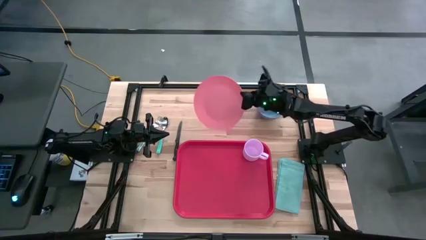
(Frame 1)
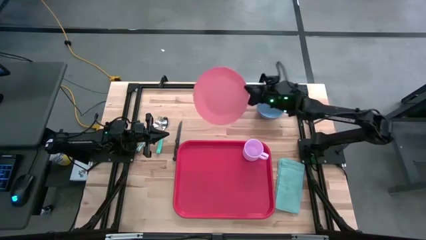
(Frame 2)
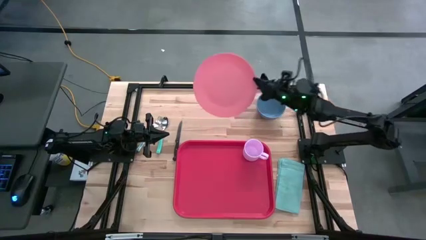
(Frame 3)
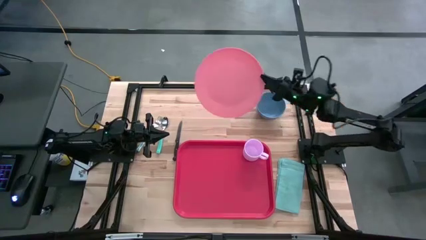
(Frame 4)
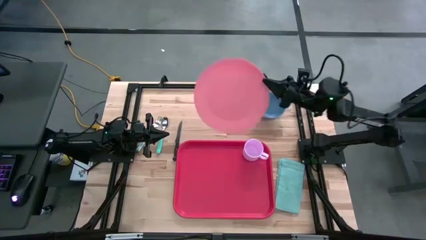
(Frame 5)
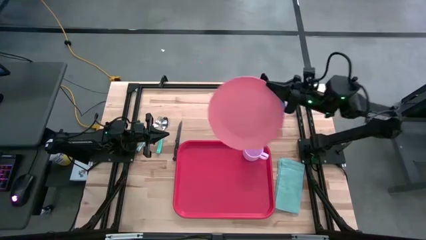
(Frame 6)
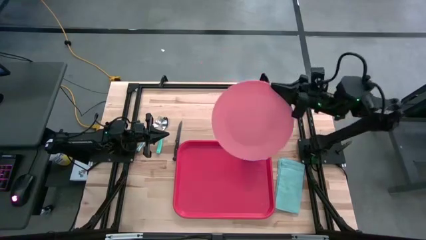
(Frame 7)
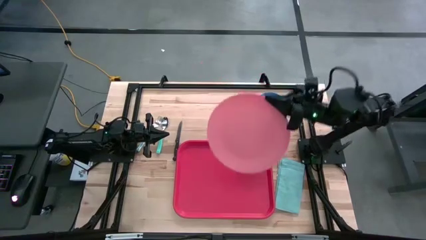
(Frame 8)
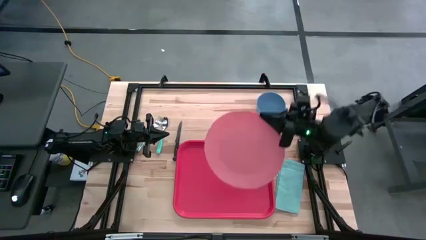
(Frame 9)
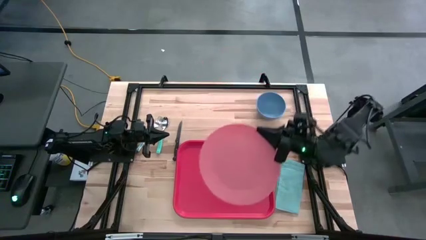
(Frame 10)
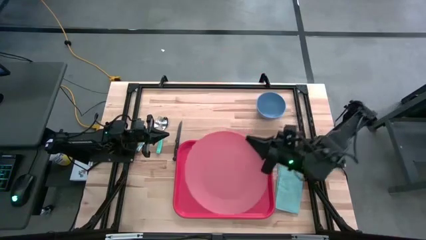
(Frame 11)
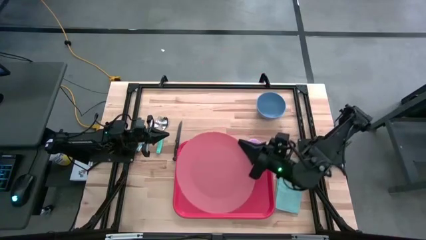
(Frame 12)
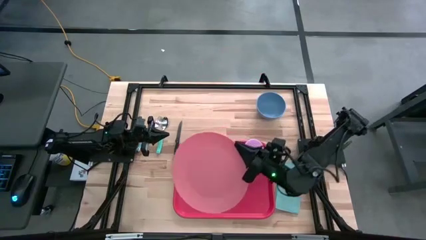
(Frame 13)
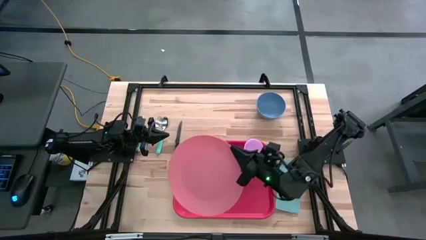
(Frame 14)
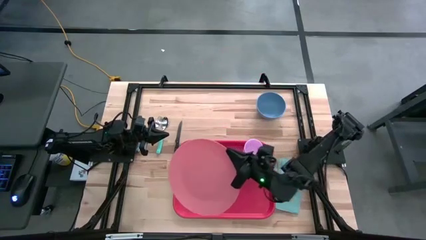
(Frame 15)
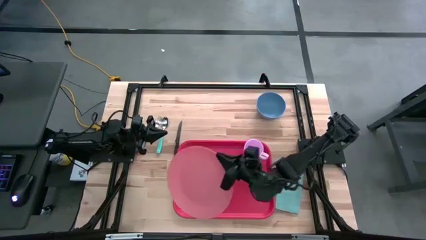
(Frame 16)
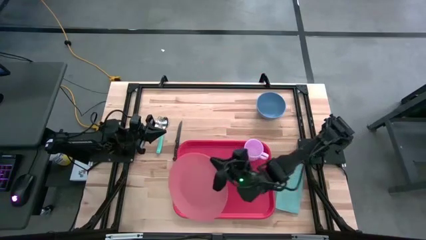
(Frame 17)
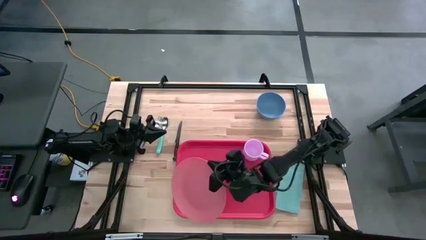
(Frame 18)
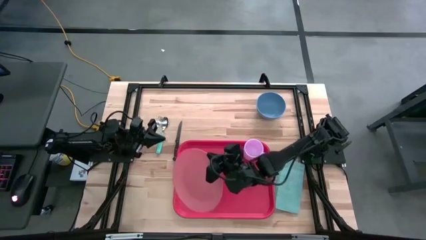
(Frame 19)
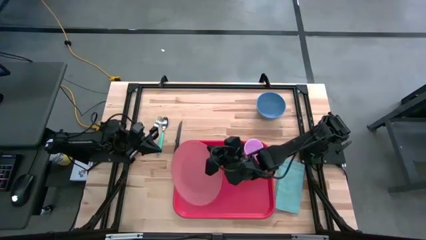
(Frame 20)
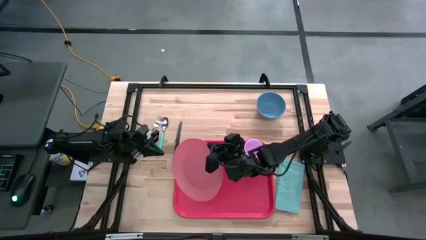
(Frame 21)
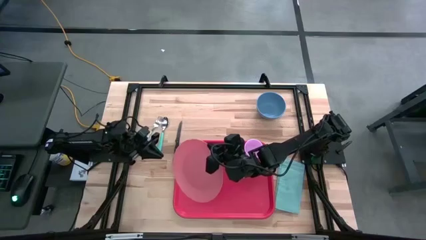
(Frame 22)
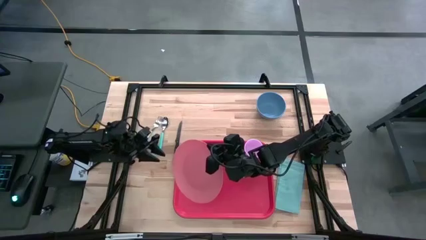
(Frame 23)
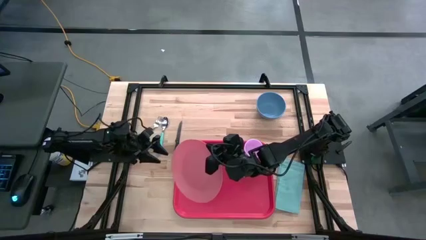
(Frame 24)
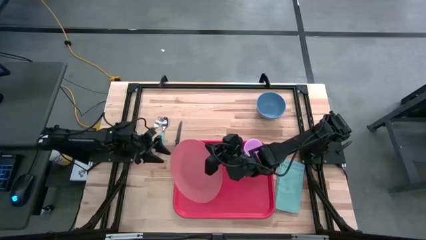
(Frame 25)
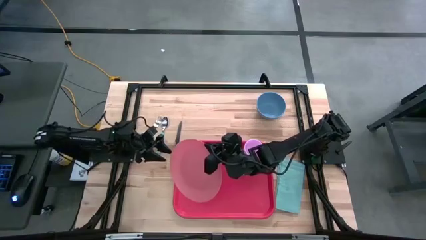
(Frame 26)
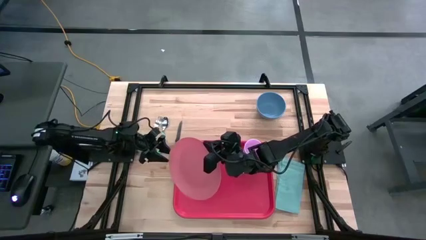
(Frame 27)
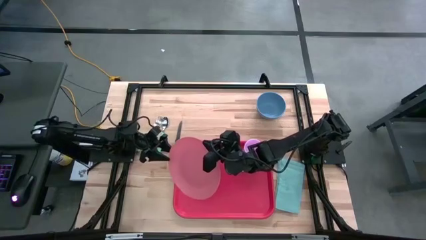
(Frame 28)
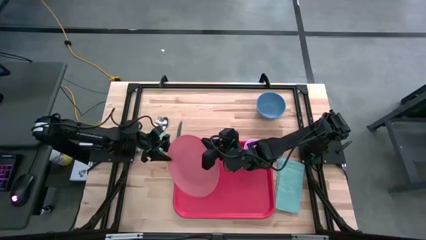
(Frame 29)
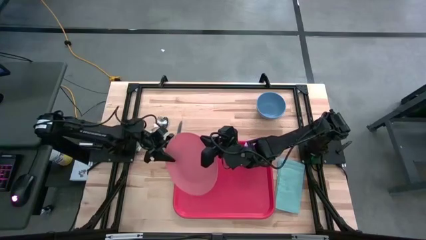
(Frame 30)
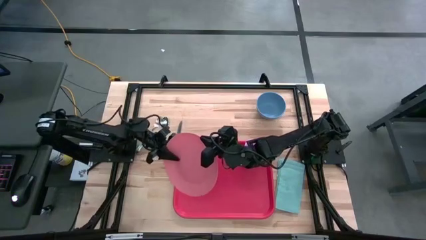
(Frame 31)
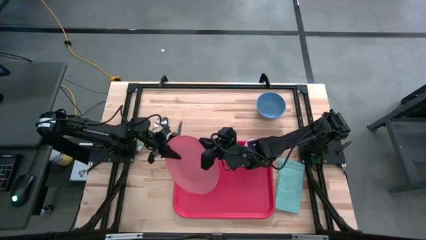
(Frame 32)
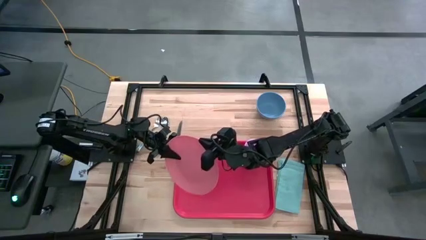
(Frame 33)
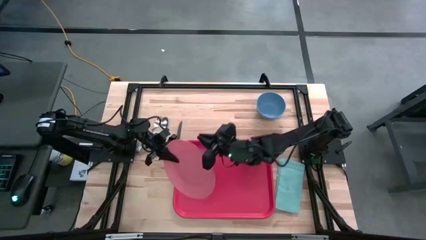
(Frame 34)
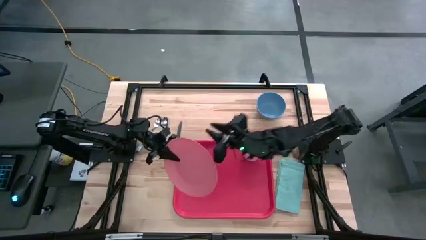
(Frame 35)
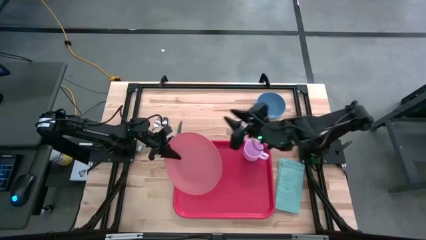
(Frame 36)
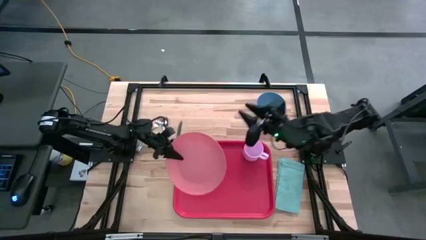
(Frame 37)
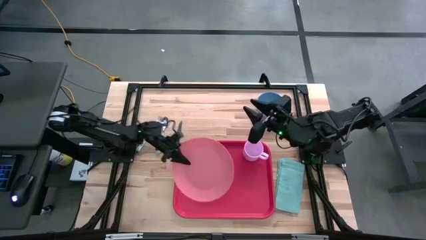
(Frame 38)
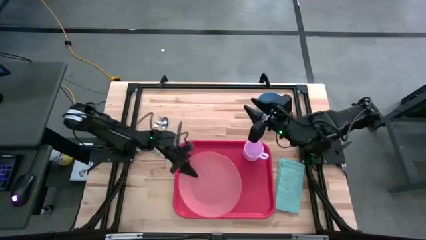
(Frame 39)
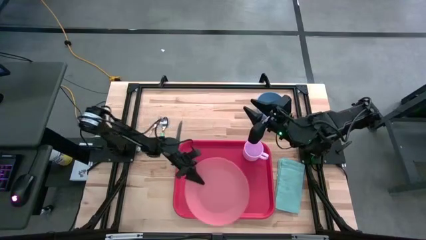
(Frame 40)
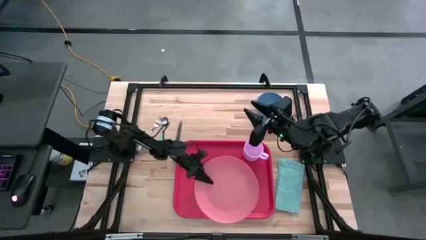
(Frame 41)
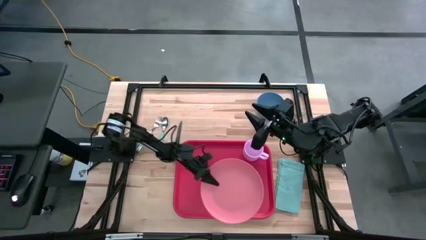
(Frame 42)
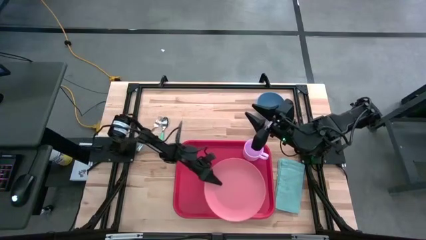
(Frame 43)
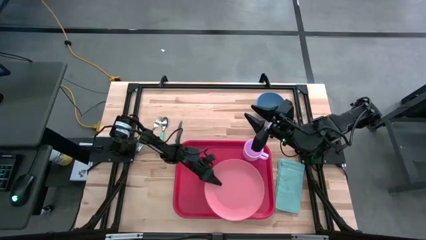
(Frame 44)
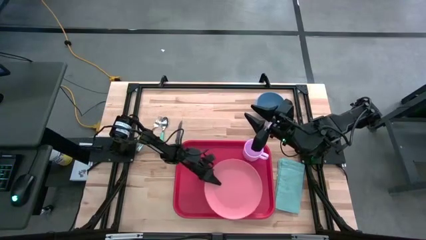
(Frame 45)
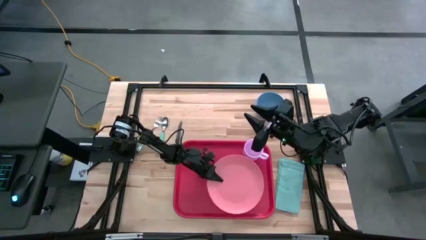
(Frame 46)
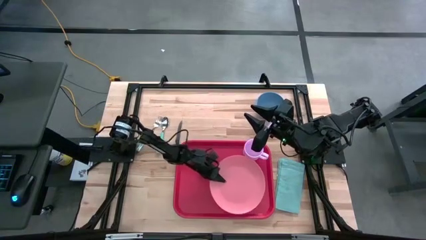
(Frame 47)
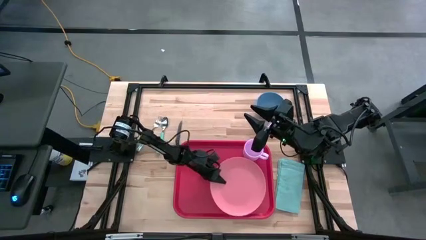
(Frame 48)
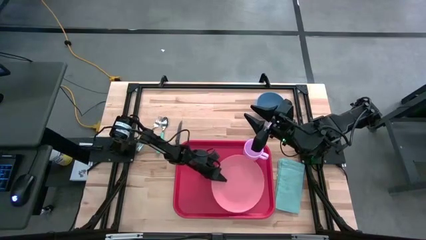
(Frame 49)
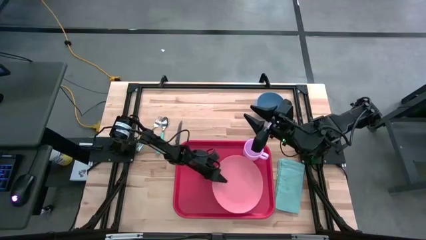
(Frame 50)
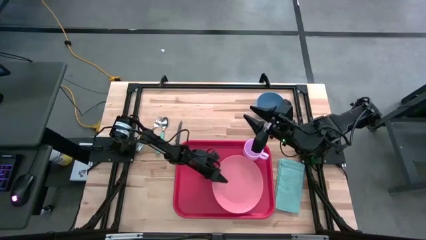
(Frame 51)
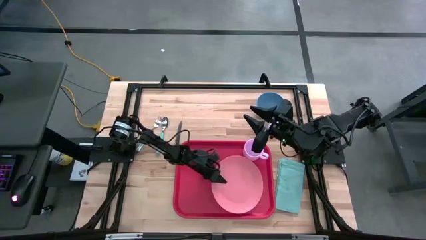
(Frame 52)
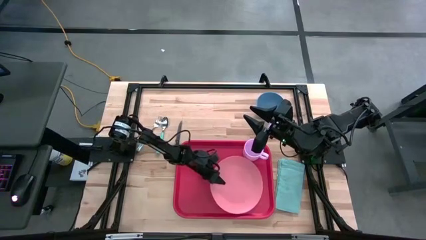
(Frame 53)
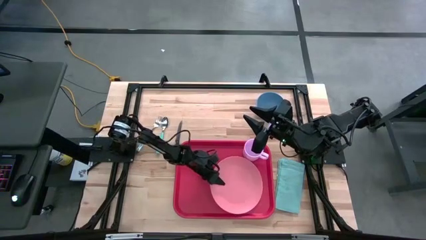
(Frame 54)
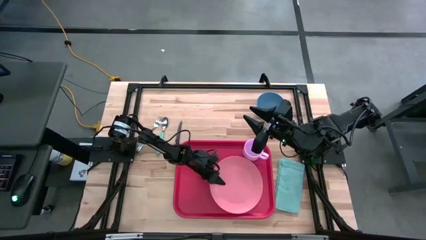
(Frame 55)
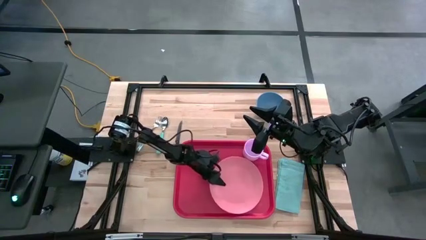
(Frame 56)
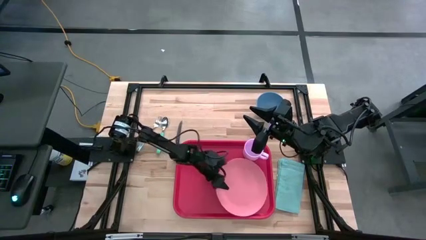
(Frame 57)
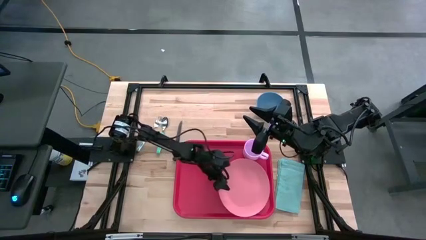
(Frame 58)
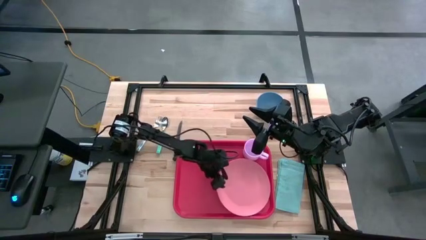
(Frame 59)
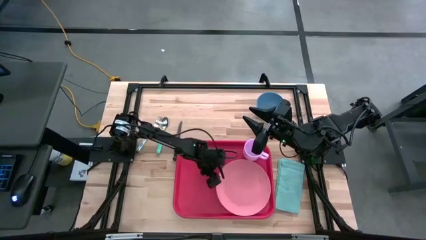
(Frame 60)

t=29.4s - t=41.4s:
Task: Set up tray
Put the pink plate into the pink serving tray
